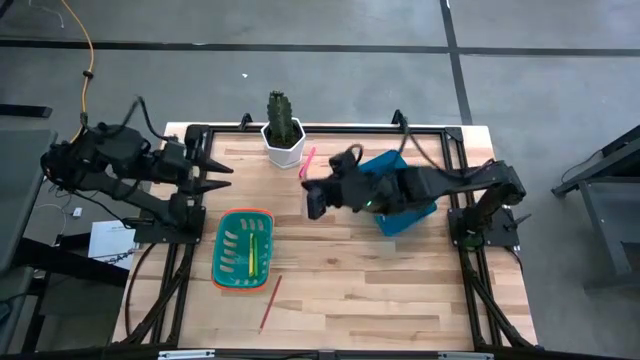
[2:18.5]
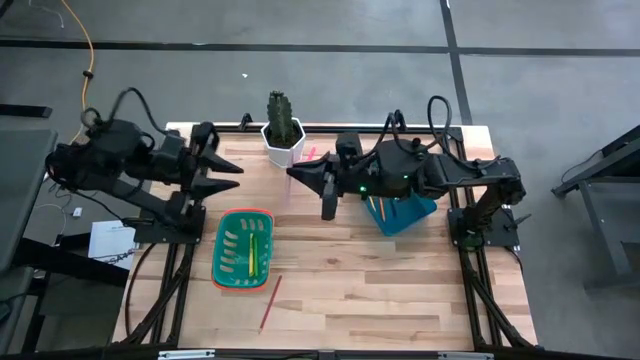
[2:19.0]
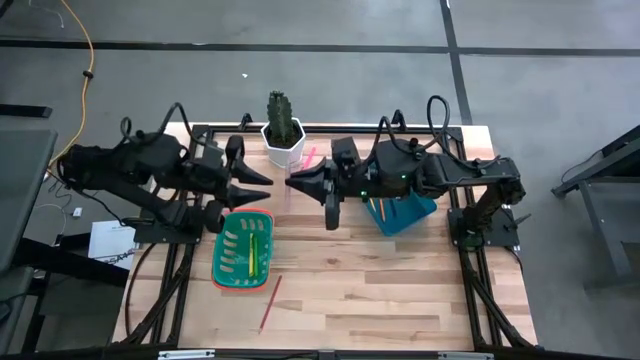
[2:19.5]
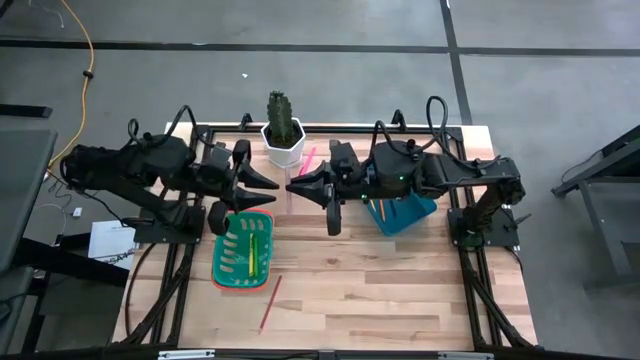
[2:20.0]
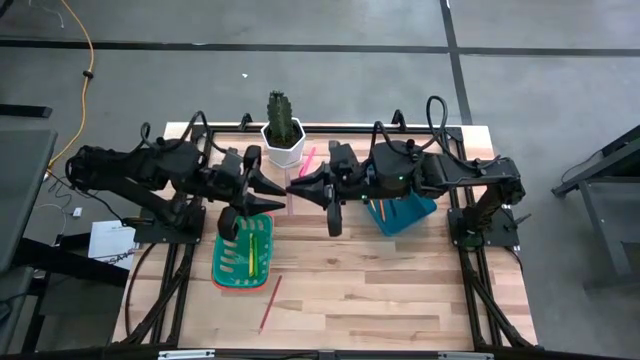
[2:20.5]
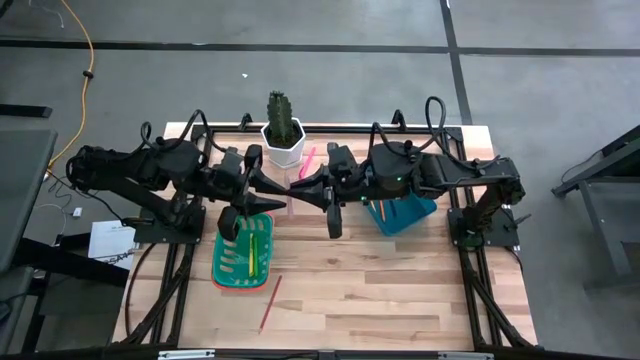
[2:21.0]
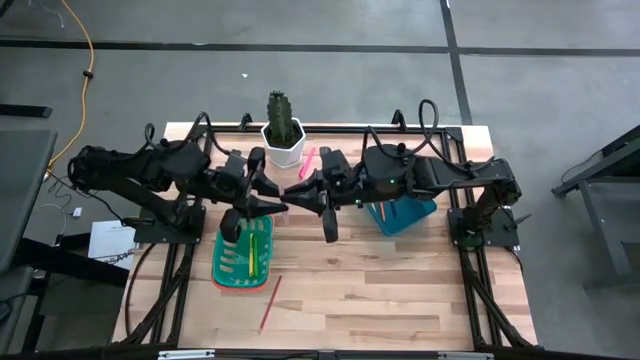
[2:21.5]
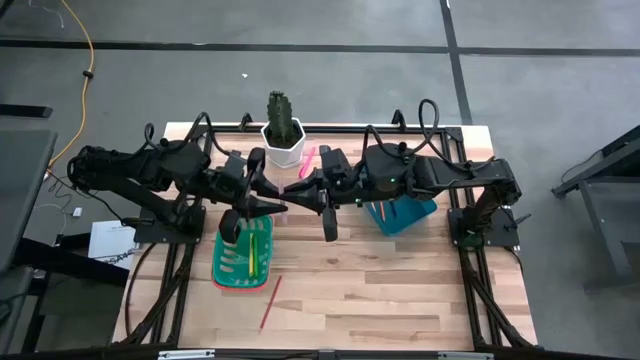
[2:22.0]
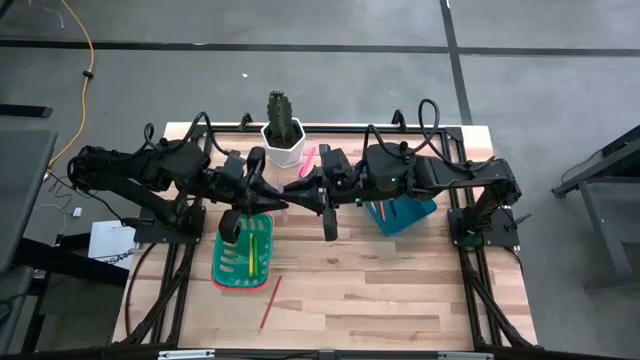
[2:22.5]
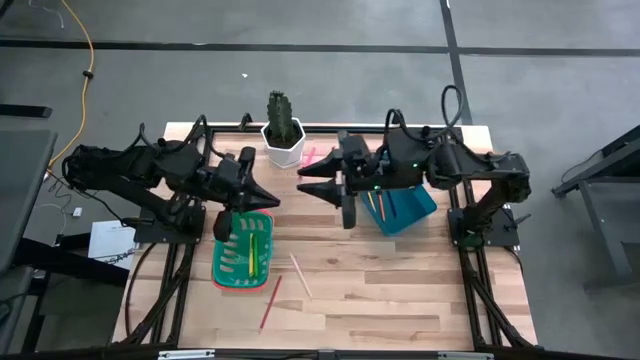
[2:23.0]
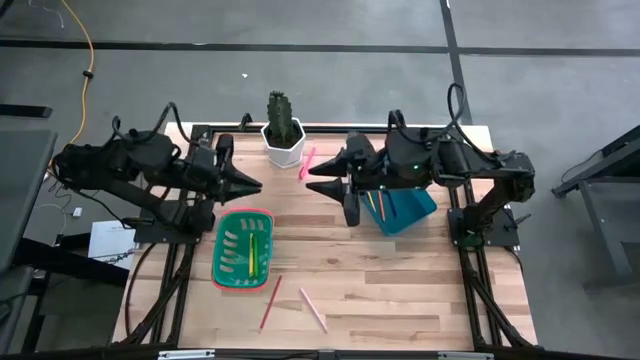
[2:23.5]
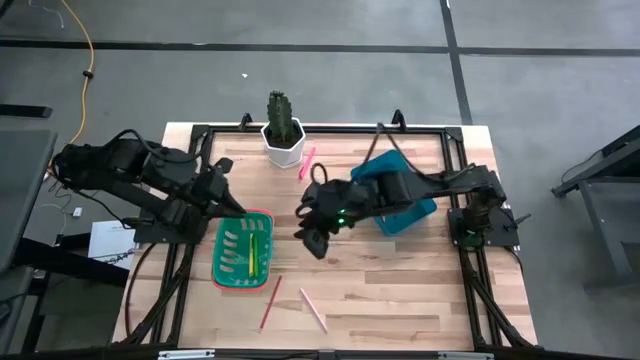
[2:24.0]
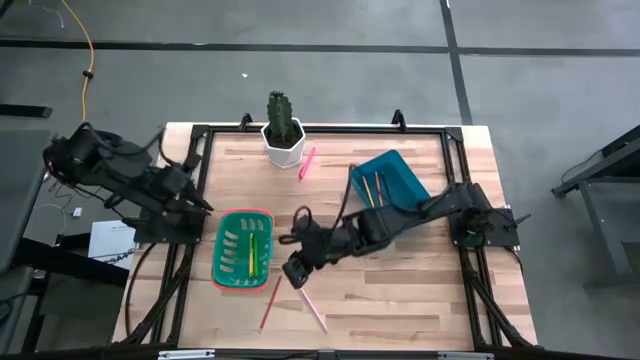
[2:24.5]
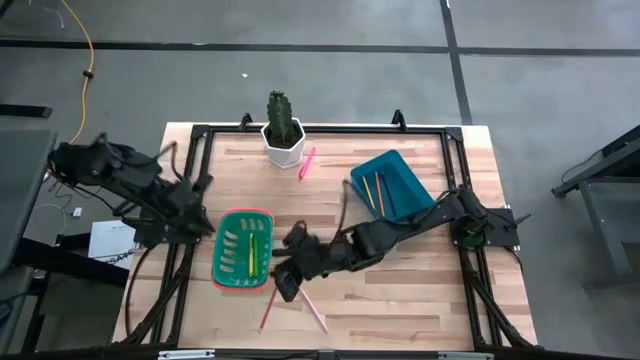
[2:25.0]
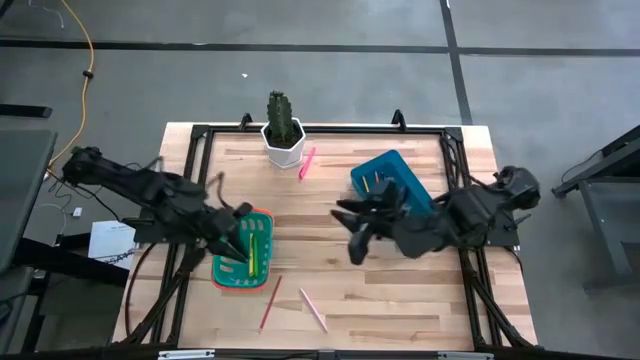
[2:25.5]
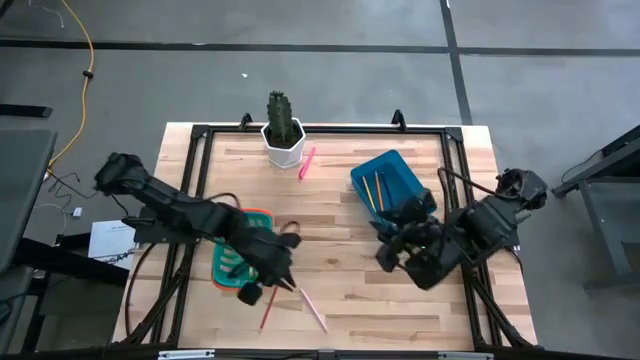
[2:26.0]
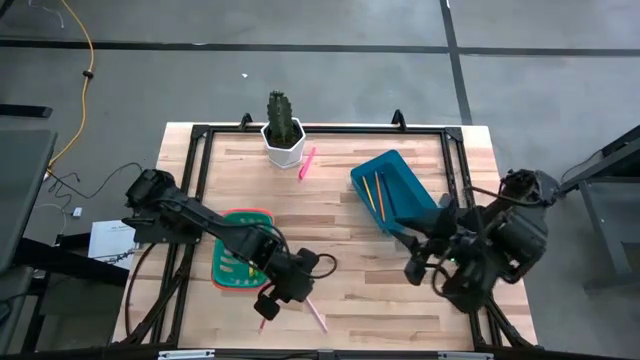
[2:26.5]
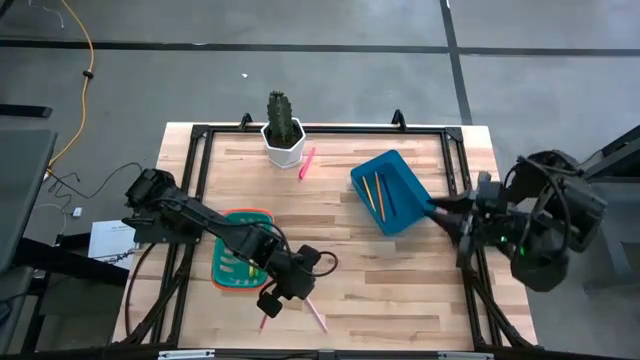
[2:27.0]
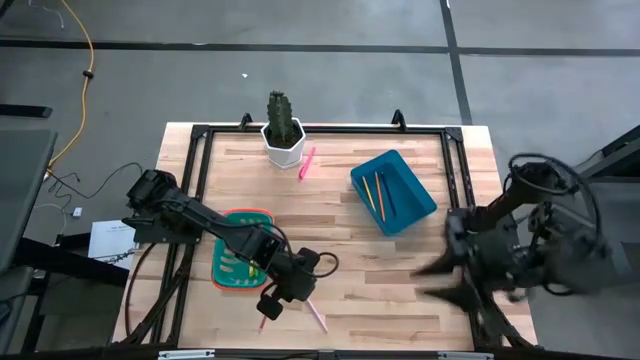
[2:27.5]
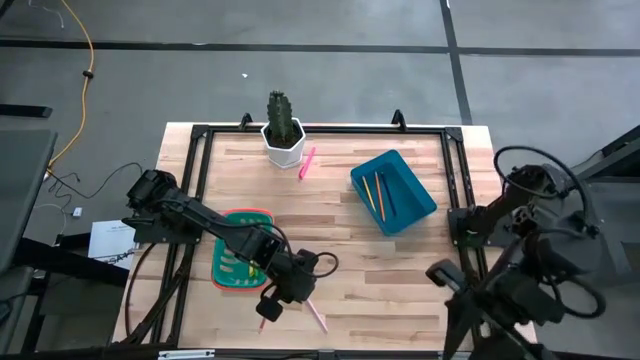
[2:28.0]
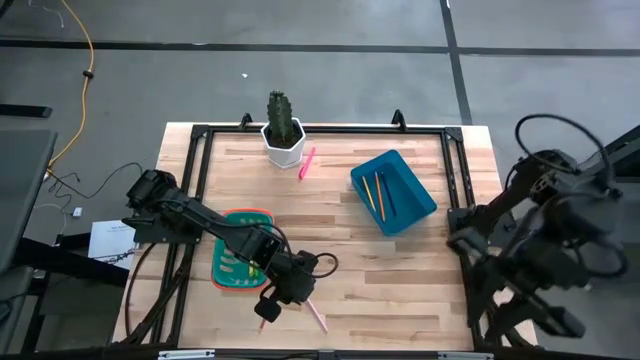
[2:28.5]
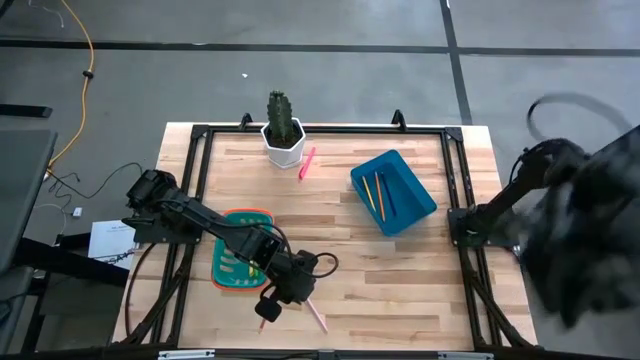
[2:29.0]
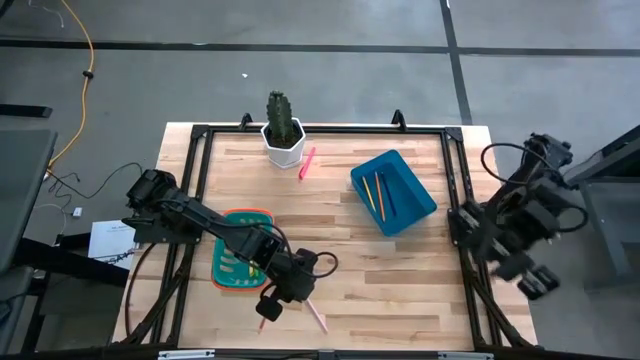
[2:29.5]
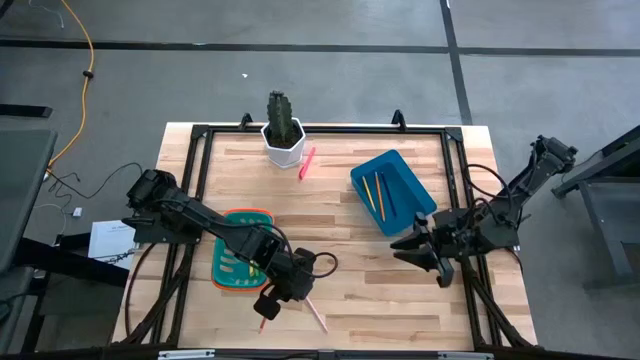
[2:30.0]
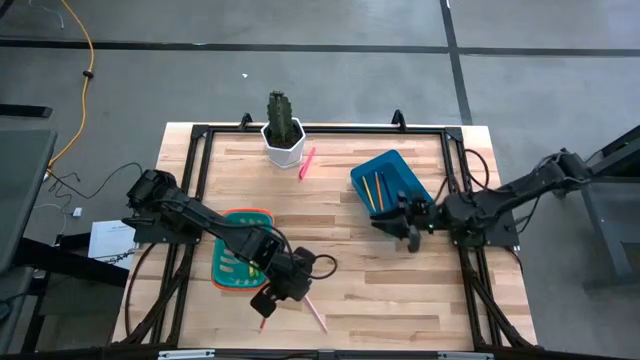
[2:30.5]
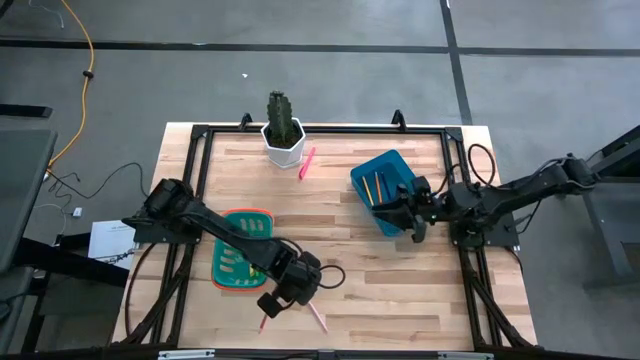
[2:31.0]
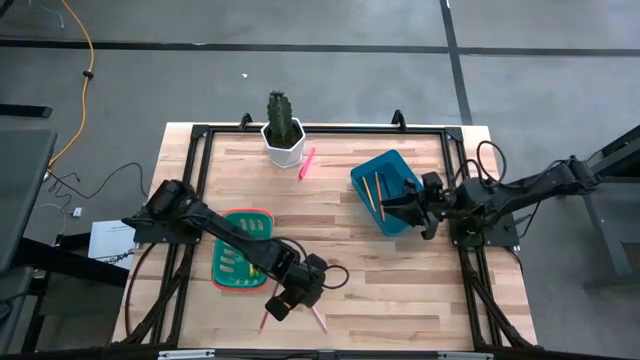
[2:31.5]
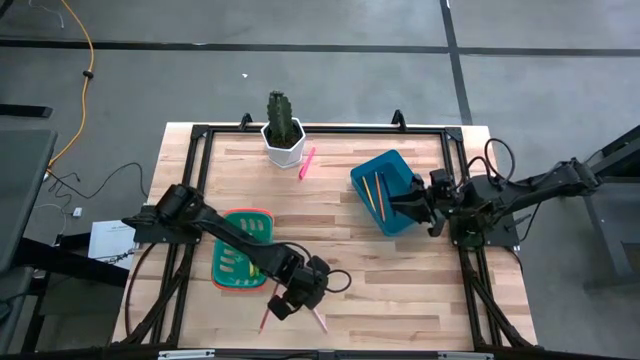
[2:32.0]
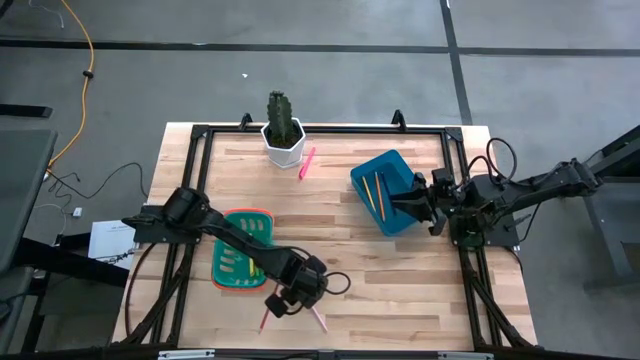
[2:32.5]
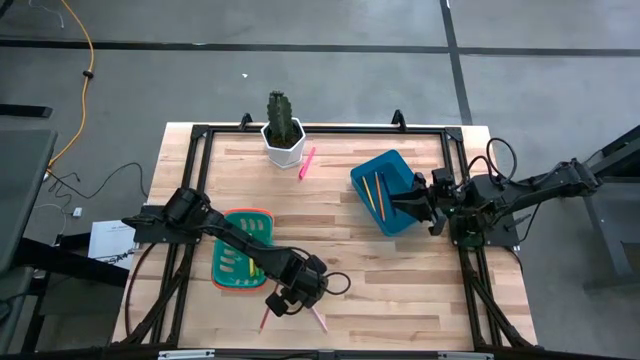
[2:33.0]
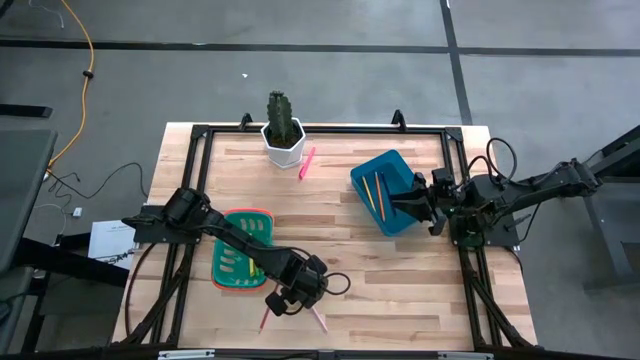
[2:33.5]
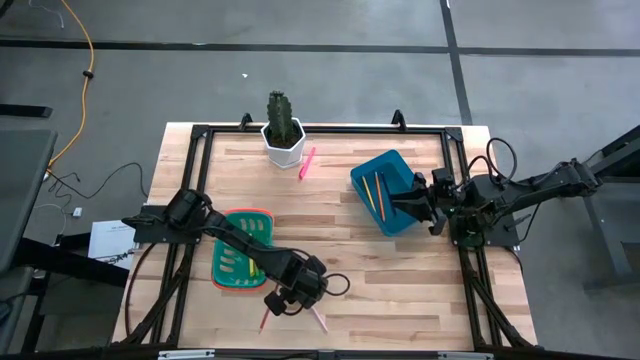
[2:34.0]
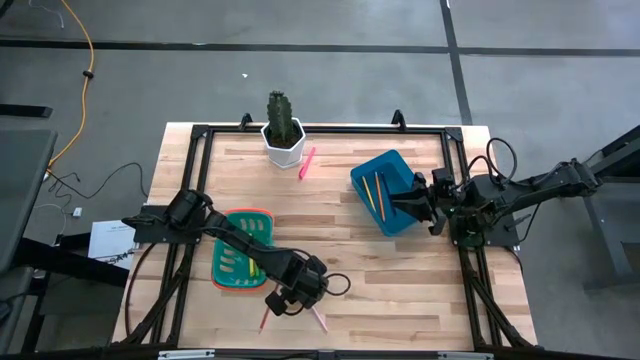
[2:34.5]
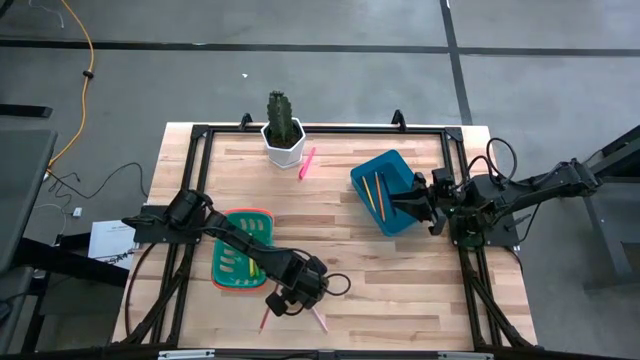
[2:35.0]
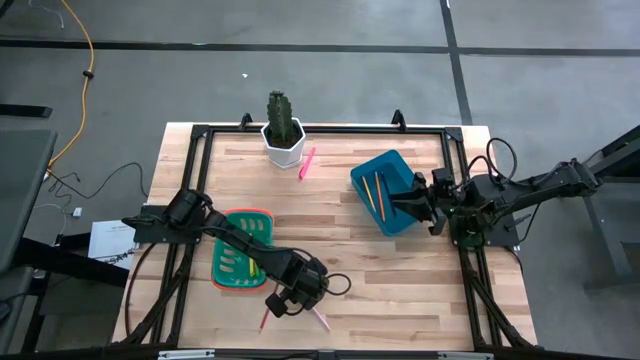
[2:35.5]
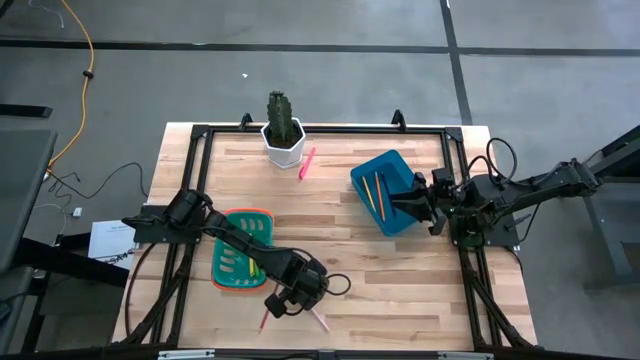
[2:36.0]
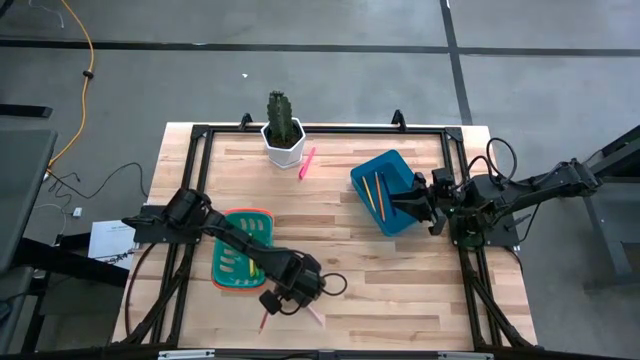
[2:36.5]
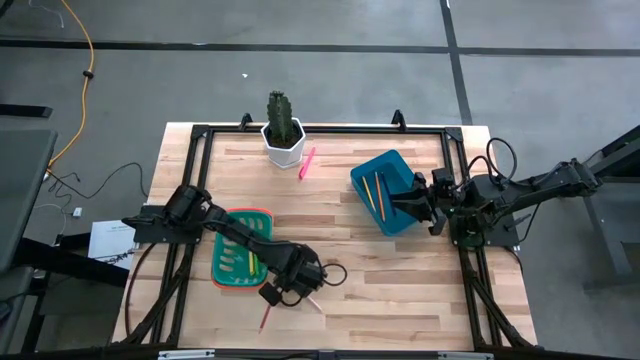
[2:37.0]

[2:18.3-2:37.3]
Task: Sort pens & pencils
Put the light pink pen into the green basket
